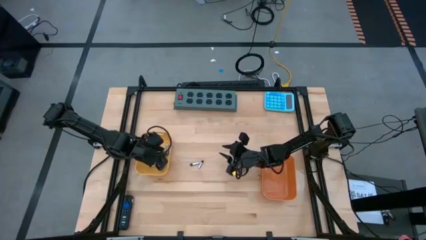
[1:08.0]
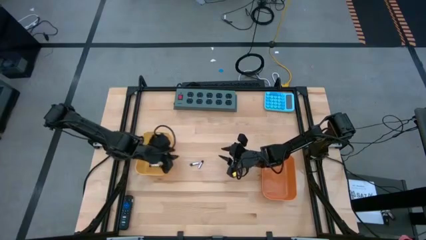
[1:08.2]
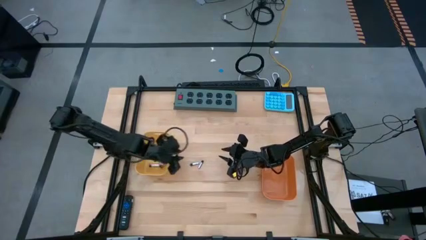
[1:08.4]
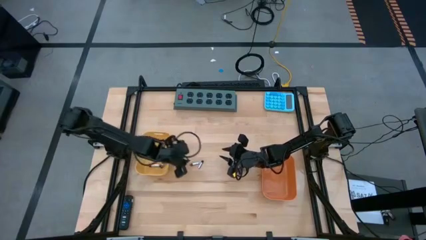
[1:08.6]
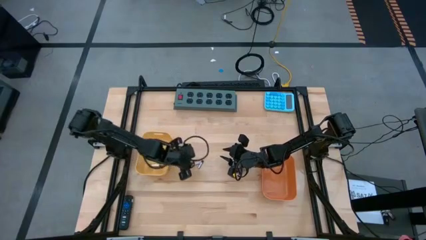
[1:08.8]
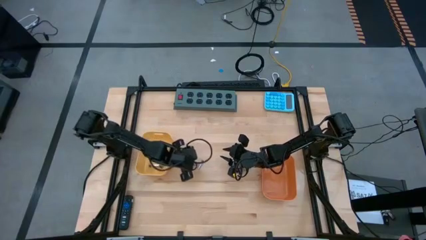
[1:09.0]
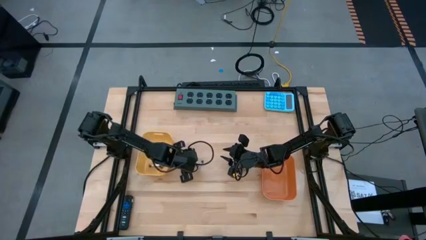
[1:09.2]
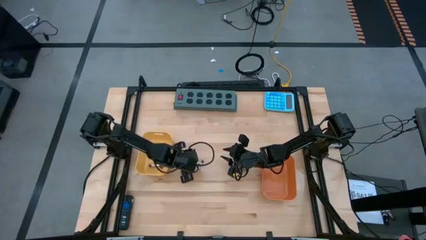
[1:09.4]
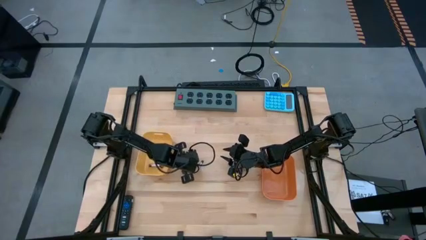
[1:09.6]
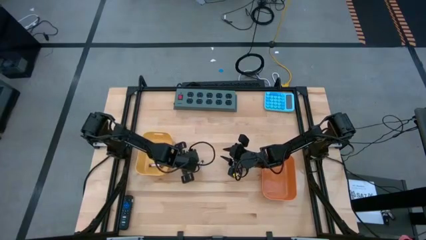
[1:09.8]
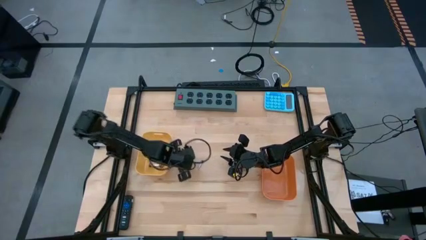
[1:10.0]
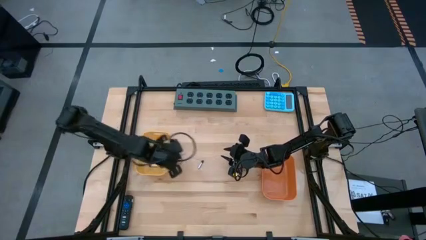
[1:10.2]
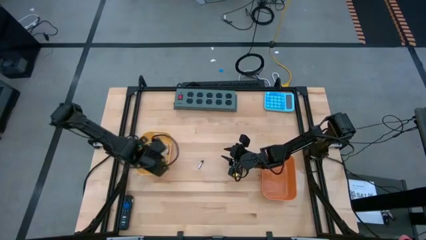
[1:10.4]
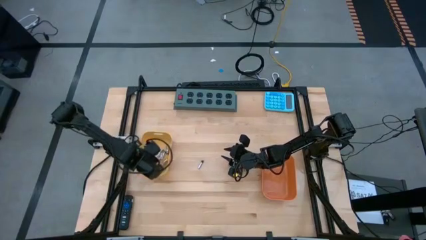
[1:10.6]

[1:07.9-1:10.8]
Task: Sort batteries
Put the silver battery into the yellow bin

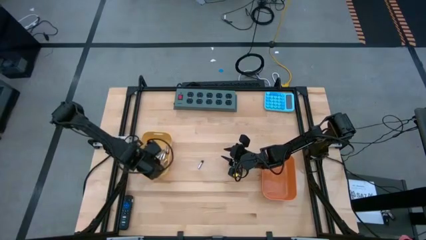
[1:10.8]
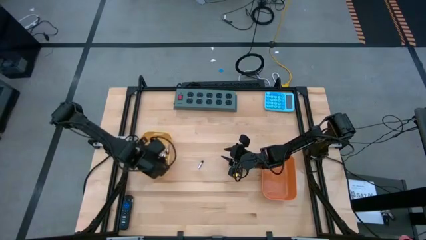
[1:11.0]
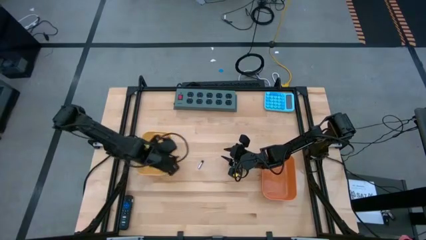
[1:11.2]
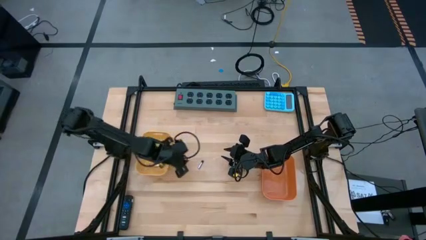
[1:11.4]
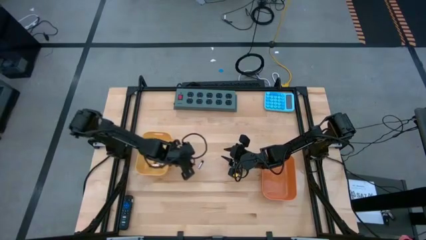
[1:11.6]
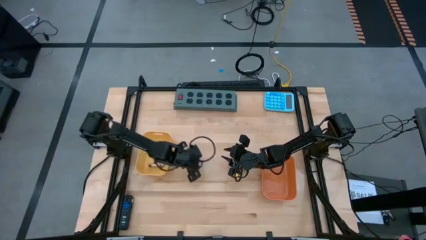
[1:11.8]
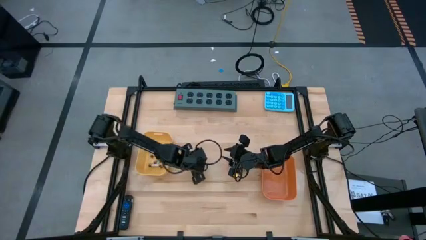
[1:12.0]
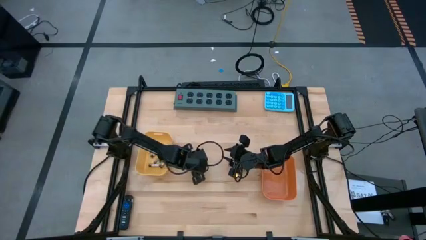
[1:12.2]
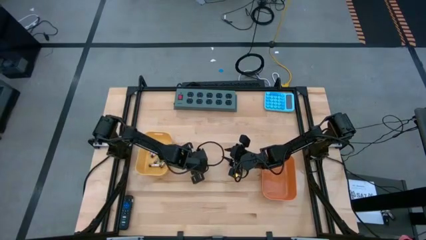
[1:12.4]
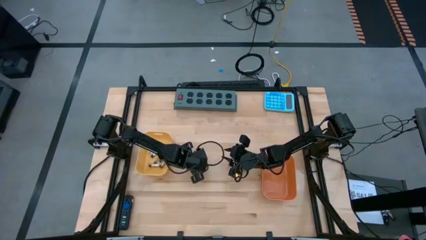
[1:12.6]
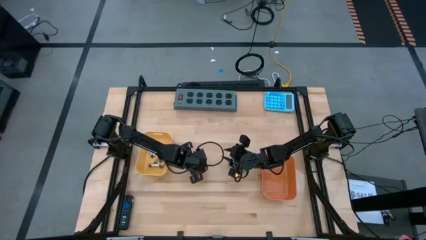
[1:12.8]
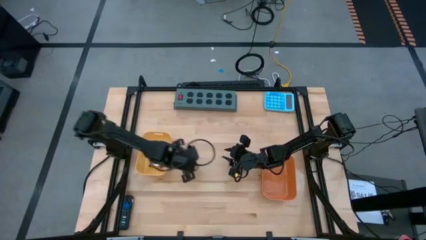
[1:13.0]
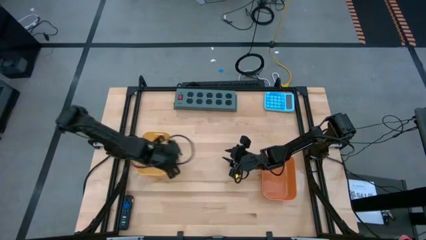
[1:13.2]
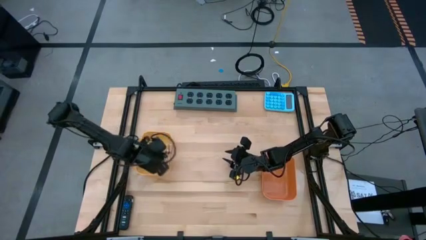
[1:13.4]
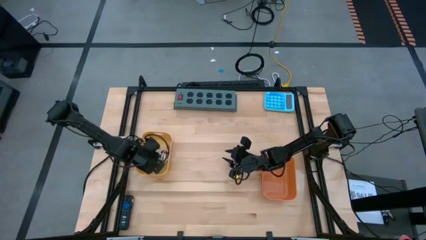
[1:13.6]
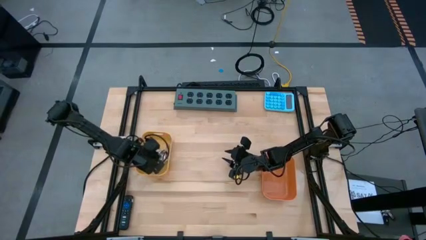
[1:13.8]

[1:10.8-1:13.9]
Put the silver battery into the yellow bin

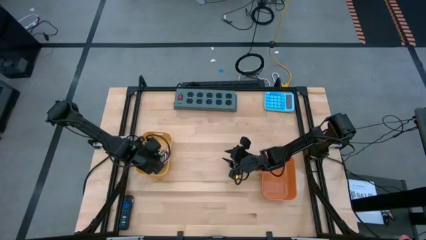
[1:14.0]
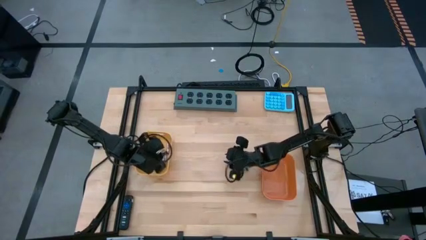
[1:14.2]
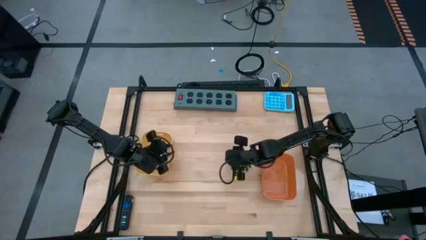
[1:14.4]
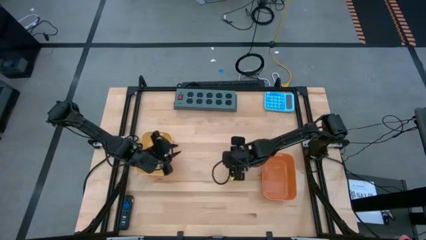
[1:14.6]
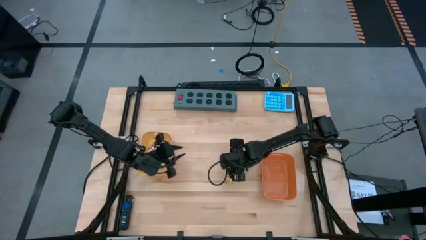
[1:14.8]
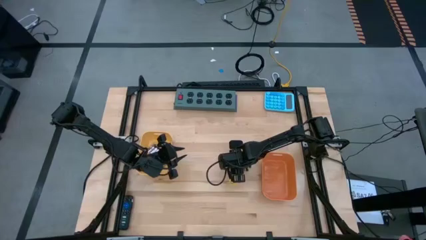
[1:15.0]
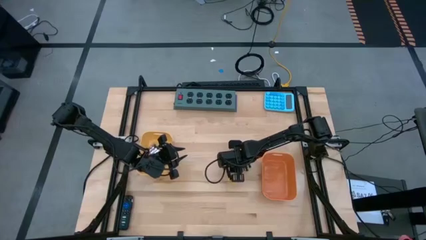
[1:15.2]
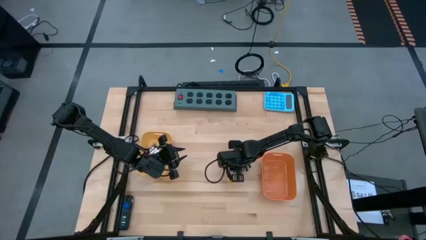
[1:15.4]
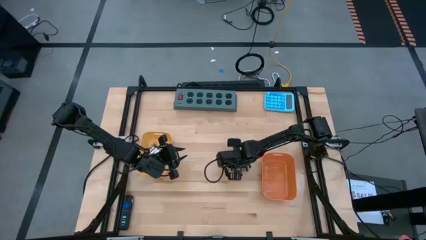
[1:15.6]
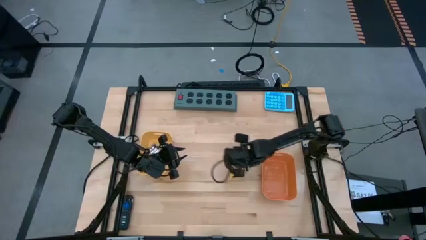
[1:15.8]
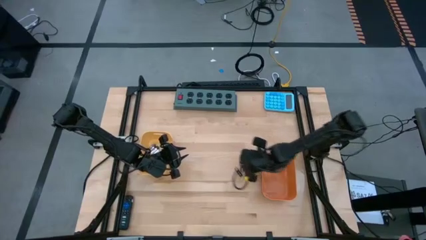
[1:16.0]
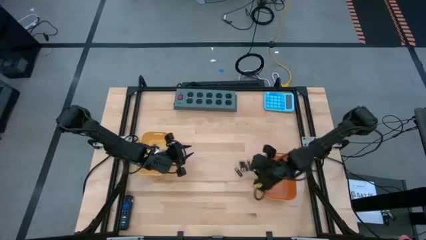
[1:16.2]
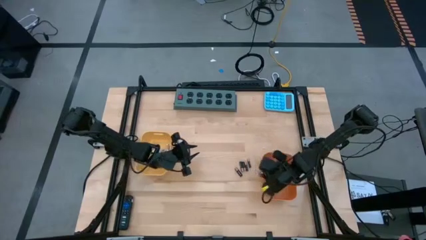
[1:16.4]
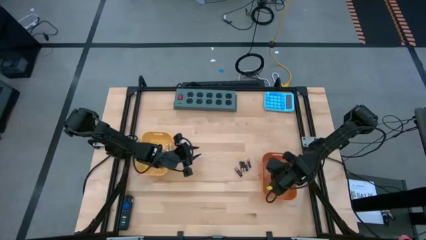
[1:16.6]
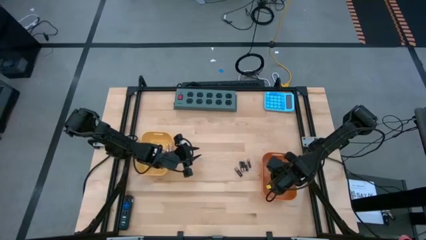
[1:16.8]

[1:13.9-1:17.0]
Put the black battery into the orange bin

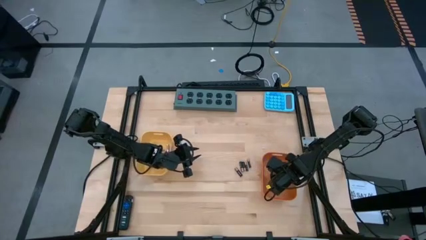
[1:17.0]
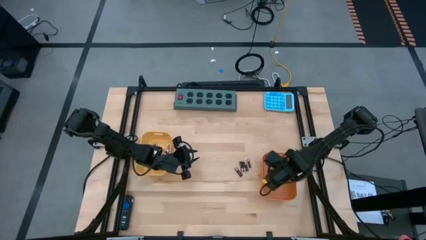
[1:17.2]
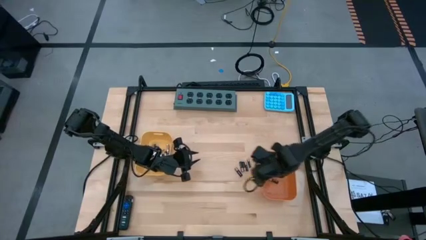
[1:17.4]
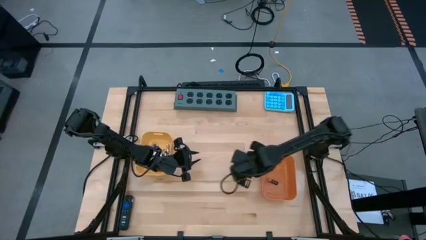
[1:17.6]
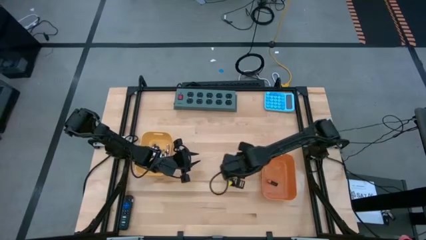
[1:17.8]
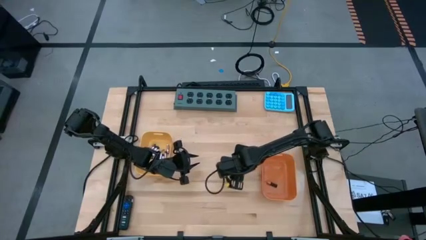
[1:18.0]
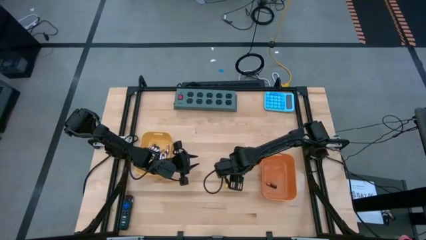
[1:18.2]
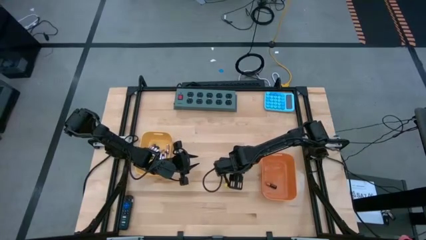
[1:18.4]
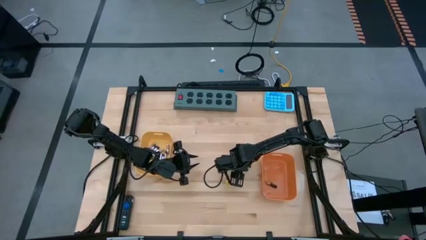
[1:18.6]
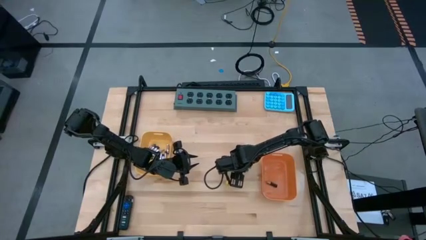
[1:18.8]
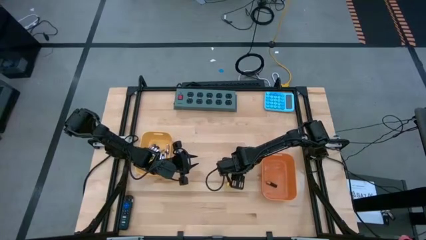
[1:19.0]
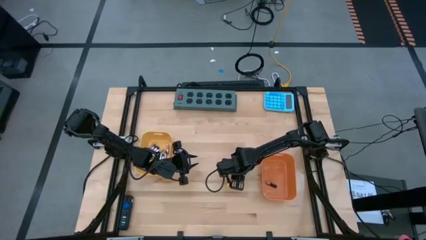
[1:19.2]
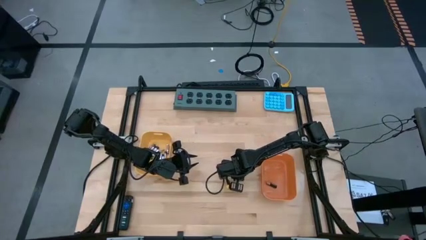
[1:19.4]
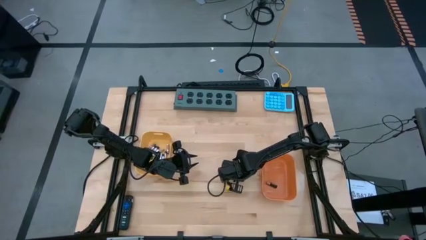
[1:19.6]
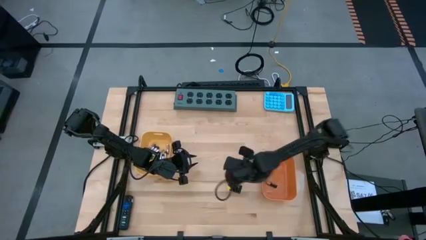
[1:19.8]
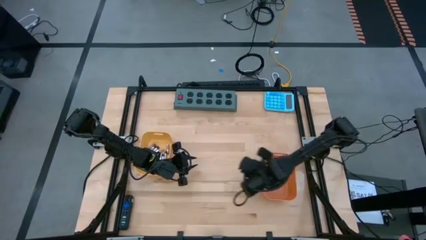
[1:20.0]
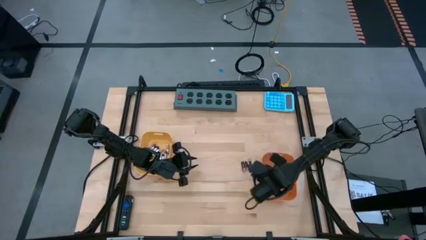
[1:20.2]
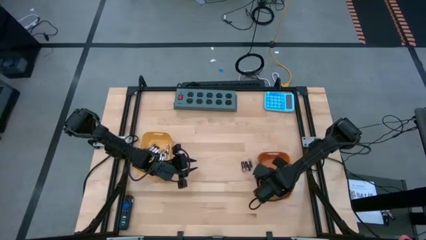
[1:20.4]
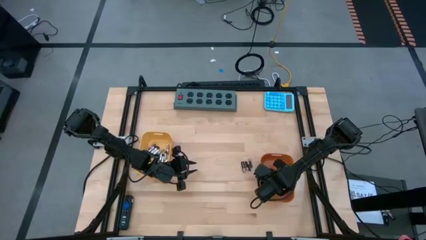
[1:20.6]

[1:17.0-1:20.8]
Put the black battery into the orange bin

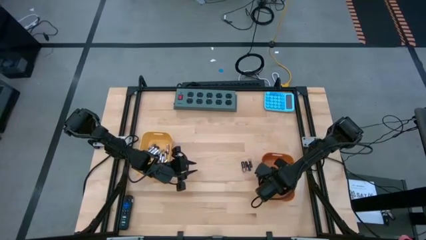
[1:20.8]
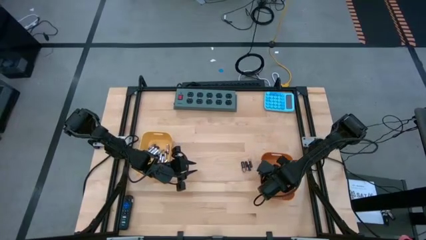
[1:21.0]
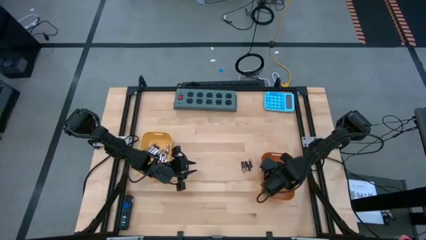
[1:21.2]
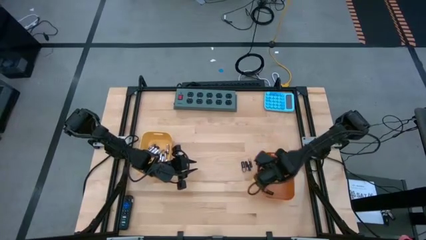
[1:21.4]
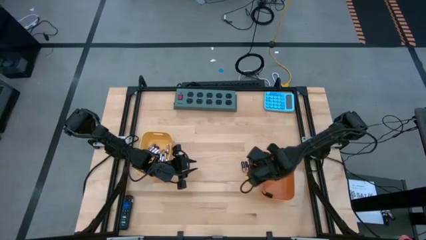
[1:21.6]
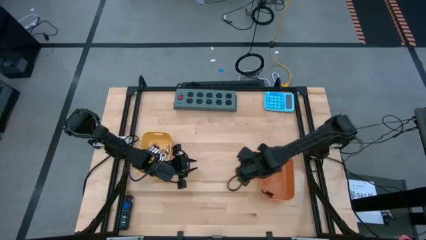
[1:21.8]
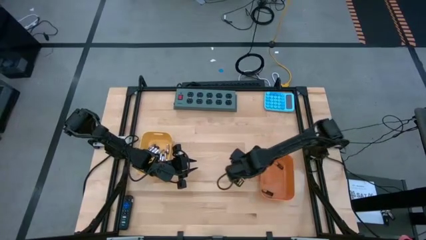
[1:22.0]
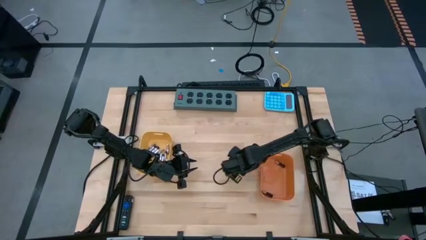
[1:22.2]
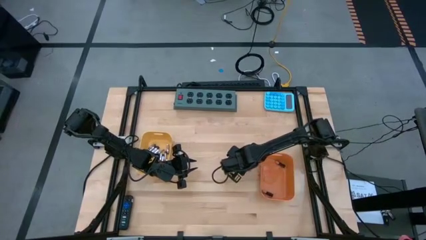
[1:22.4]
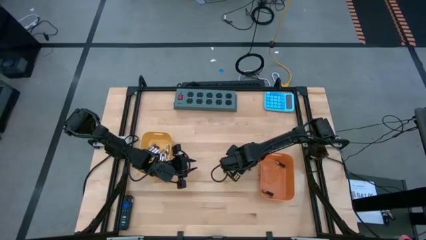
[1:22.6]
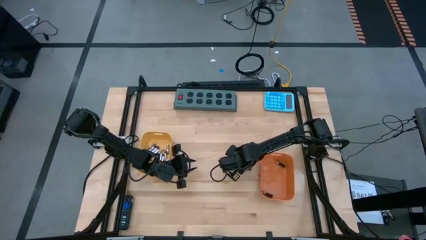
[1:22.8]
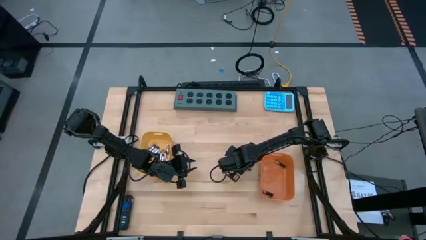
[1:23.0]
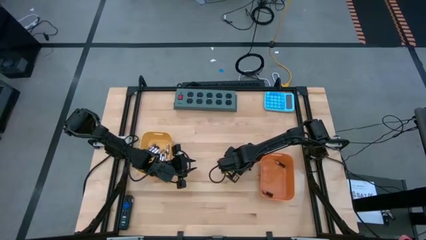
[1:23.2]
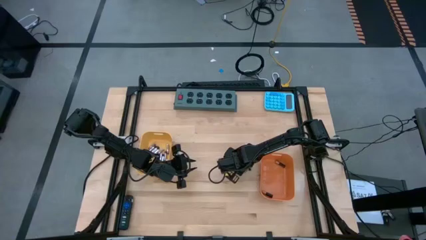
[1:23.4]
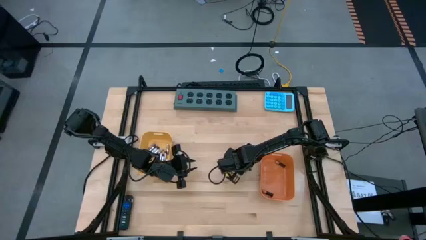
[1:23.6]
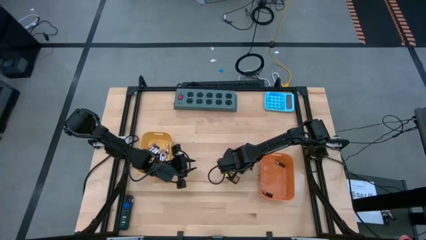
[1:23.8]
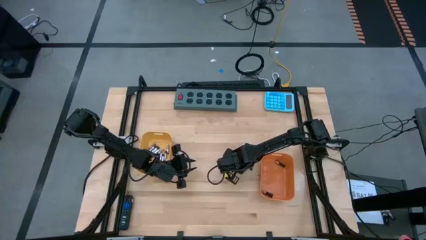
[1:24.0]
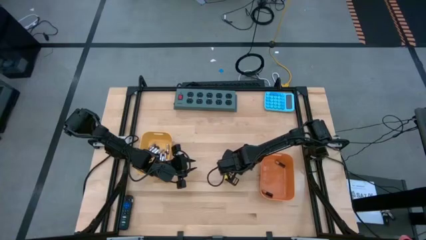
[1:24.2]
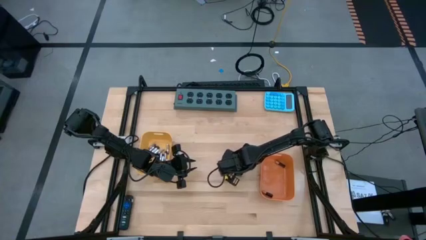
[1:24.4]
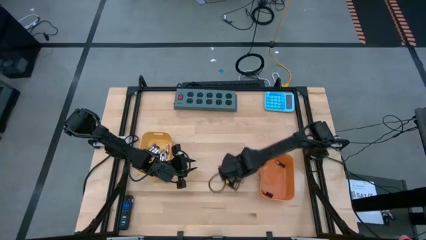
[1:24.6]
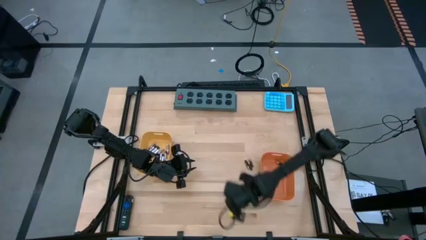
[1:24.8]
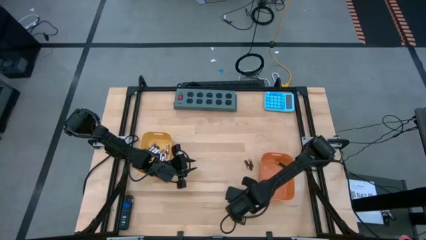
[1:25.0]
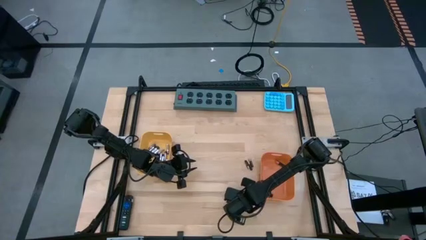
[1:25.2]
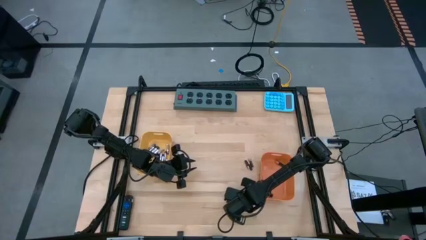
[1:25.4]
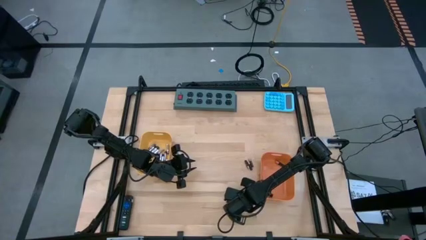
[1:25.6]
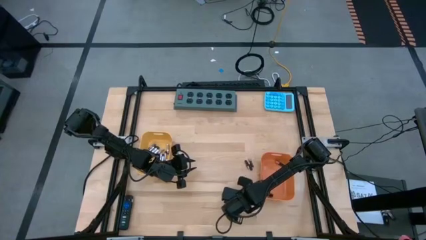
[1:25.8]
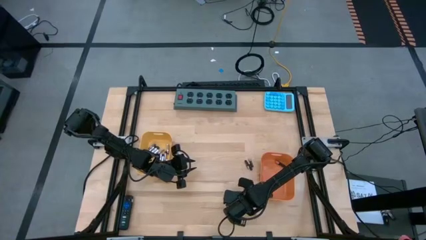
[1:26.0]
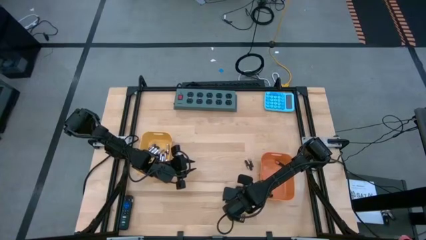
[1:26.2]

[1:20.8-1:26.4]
Put the black battery into the orange bin
